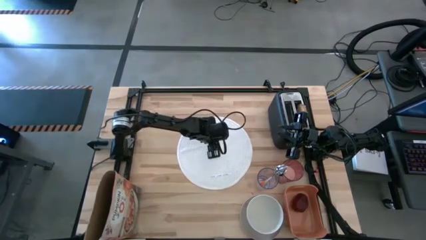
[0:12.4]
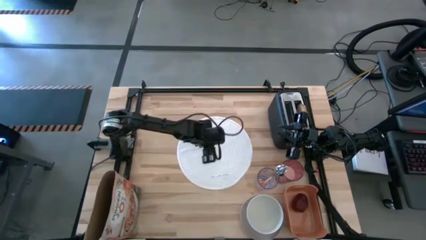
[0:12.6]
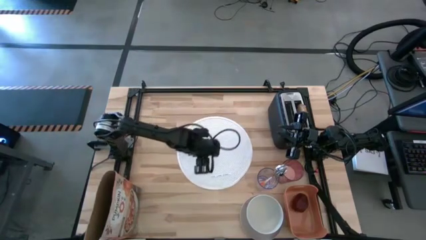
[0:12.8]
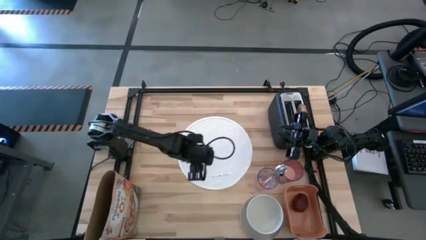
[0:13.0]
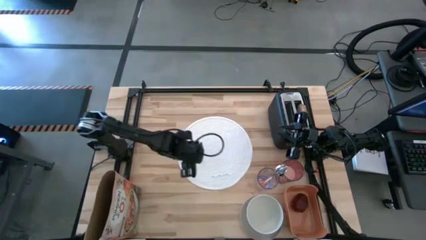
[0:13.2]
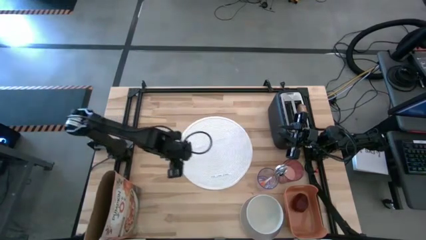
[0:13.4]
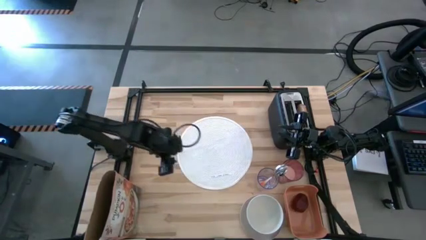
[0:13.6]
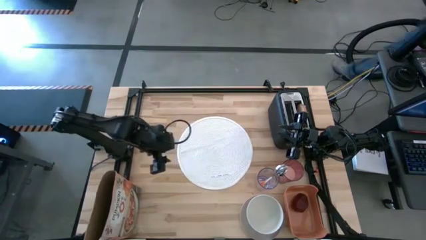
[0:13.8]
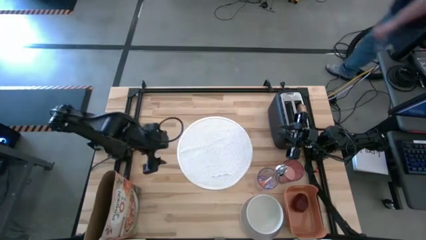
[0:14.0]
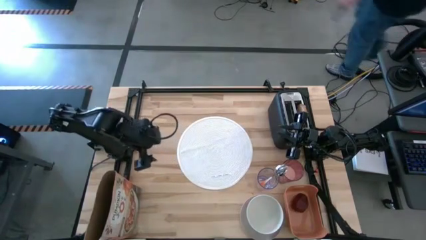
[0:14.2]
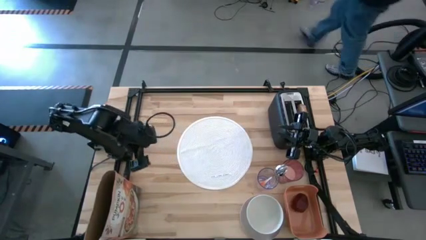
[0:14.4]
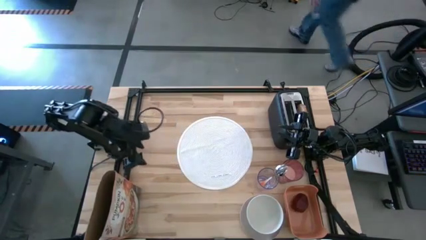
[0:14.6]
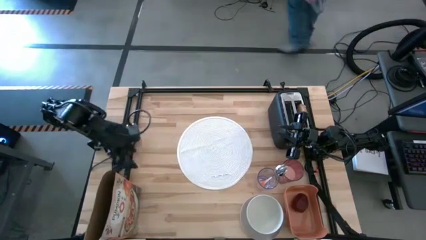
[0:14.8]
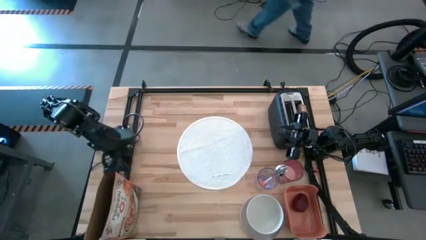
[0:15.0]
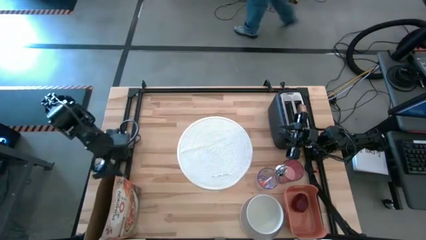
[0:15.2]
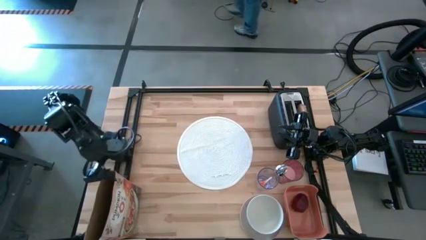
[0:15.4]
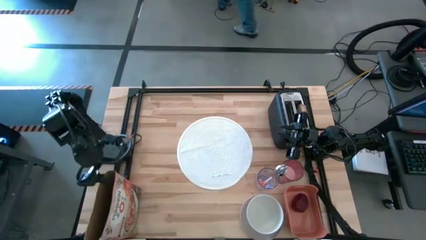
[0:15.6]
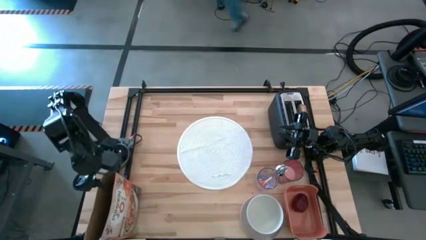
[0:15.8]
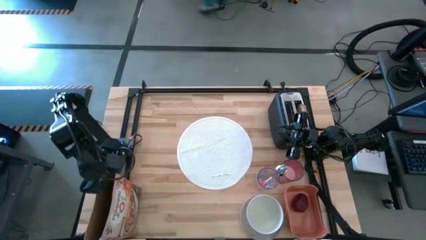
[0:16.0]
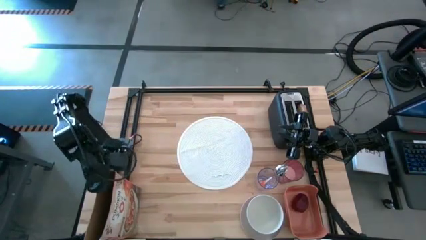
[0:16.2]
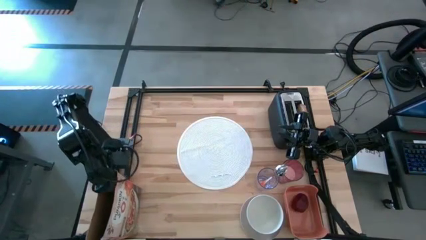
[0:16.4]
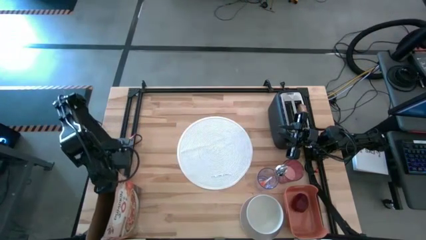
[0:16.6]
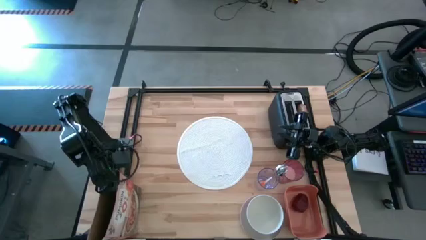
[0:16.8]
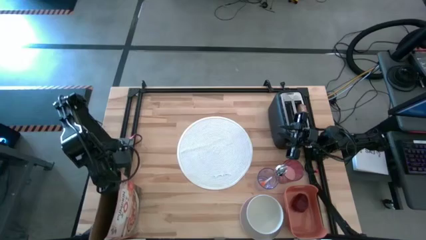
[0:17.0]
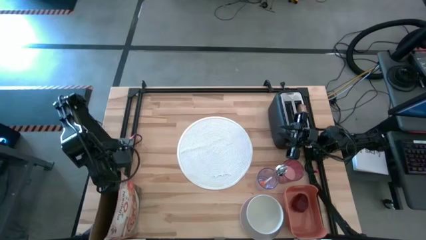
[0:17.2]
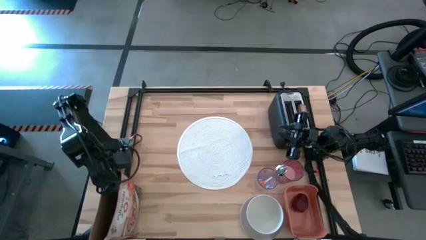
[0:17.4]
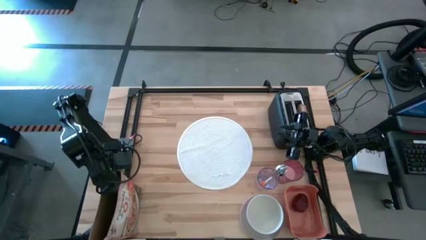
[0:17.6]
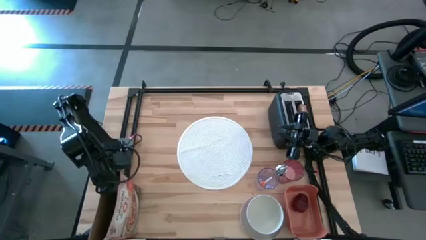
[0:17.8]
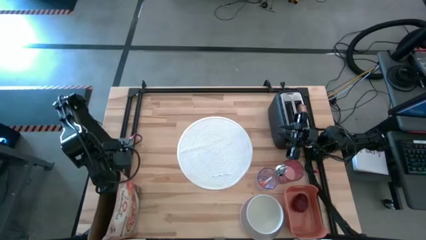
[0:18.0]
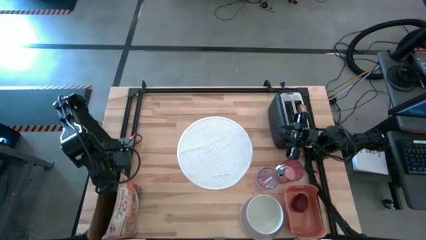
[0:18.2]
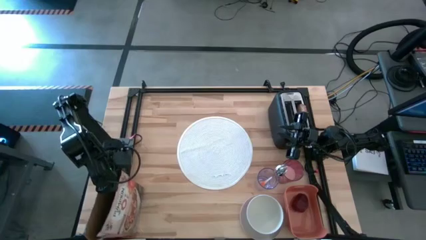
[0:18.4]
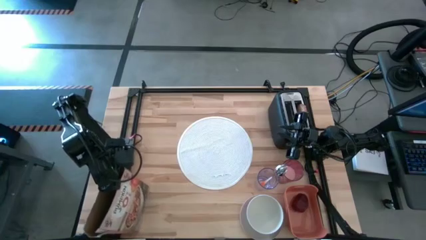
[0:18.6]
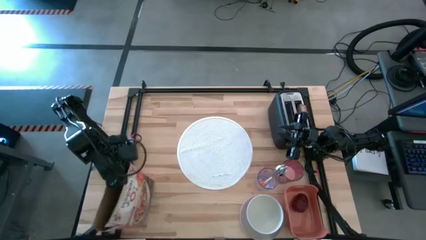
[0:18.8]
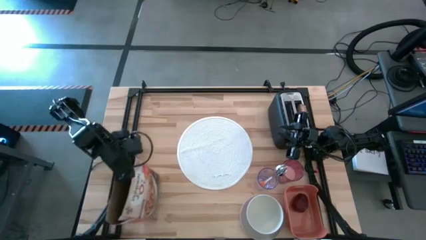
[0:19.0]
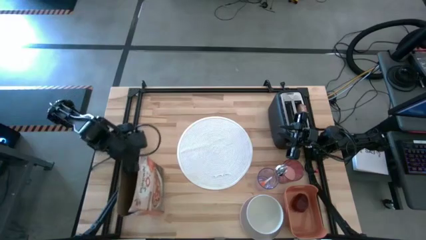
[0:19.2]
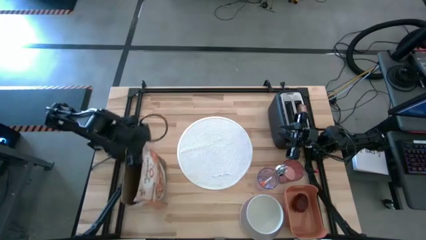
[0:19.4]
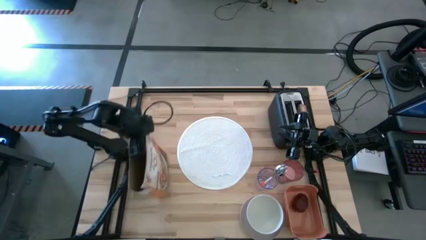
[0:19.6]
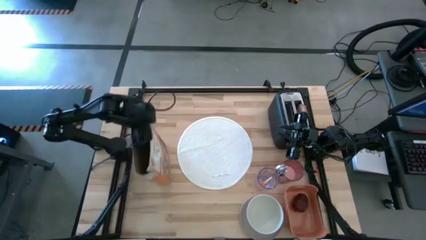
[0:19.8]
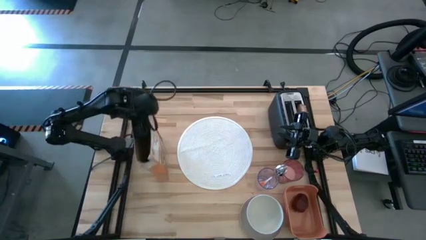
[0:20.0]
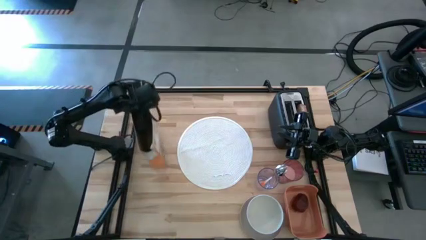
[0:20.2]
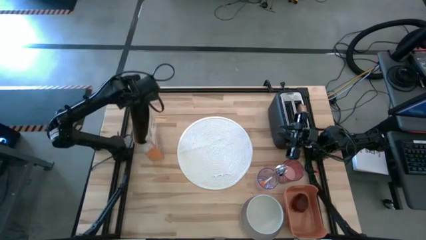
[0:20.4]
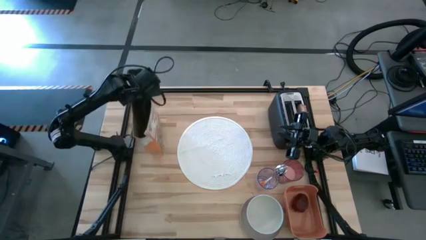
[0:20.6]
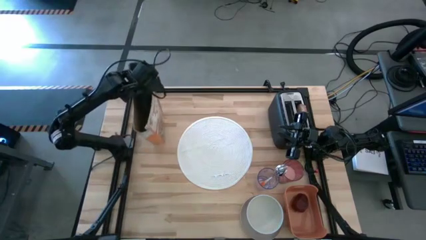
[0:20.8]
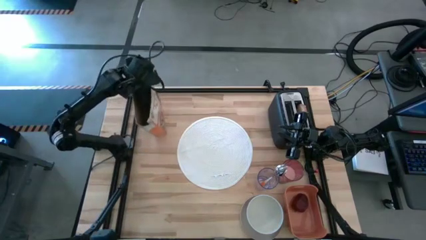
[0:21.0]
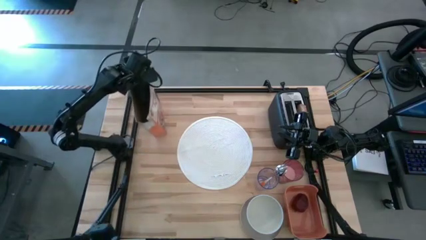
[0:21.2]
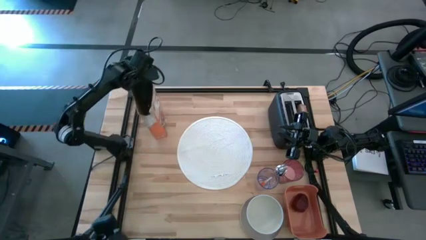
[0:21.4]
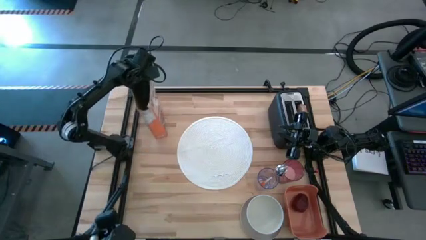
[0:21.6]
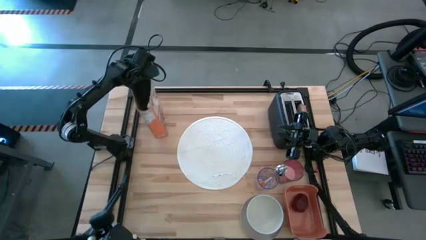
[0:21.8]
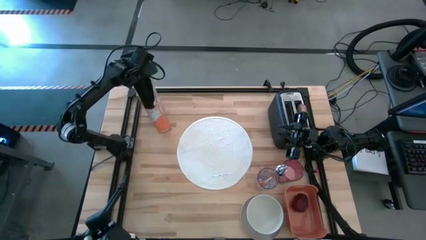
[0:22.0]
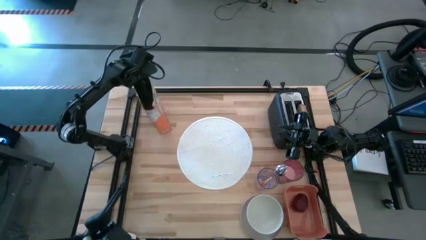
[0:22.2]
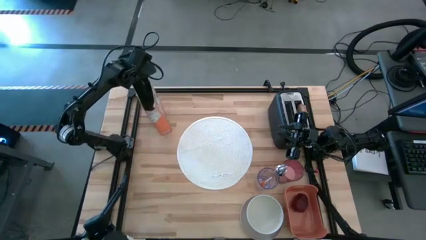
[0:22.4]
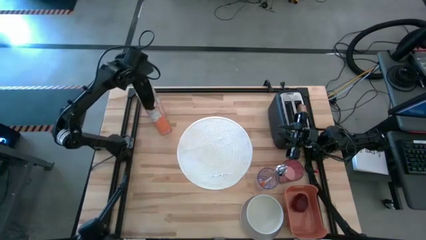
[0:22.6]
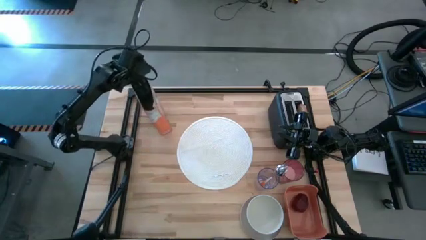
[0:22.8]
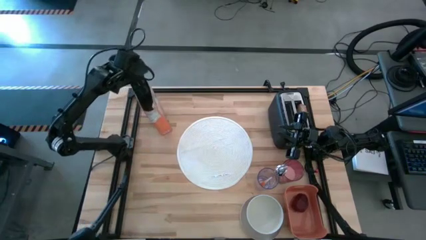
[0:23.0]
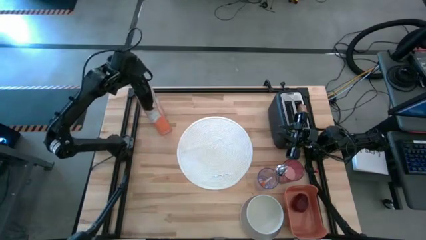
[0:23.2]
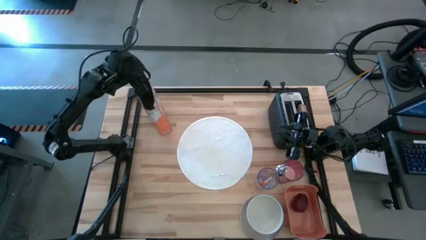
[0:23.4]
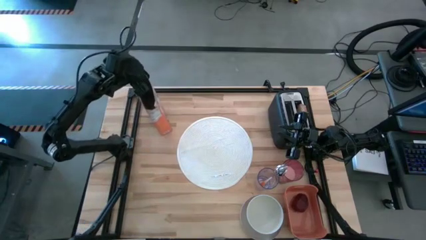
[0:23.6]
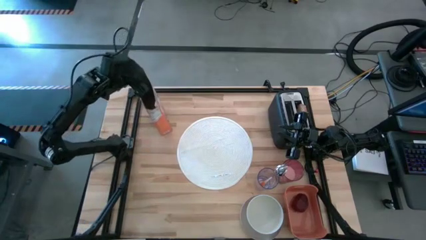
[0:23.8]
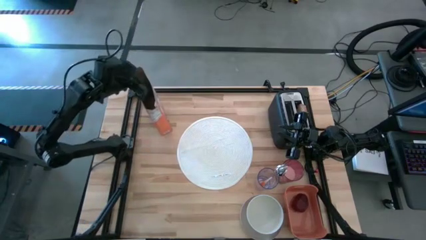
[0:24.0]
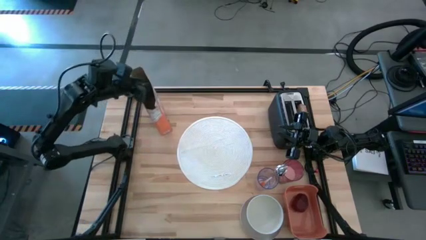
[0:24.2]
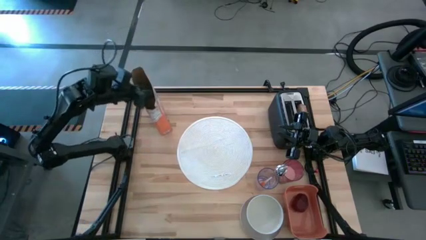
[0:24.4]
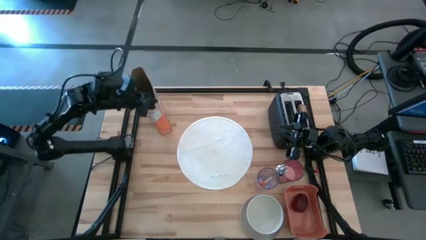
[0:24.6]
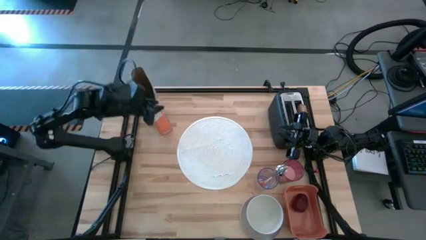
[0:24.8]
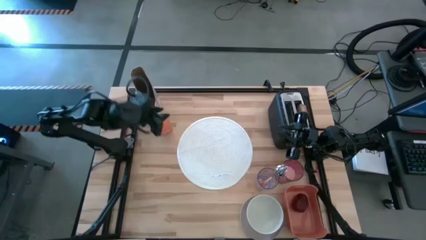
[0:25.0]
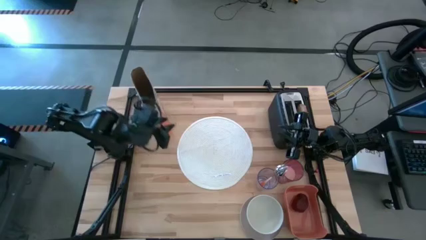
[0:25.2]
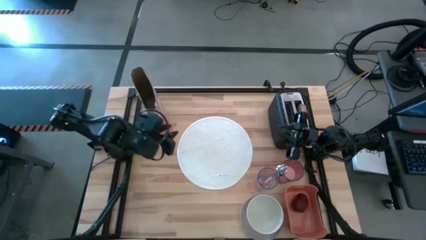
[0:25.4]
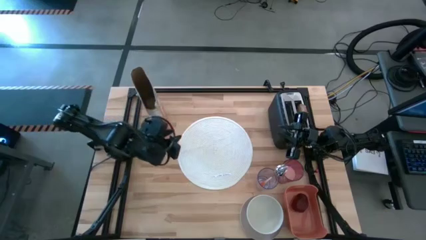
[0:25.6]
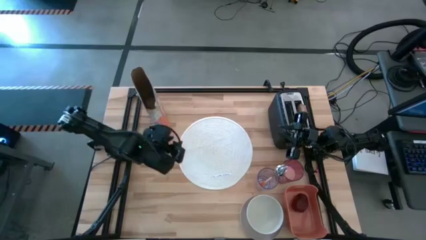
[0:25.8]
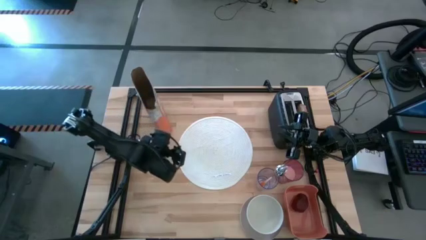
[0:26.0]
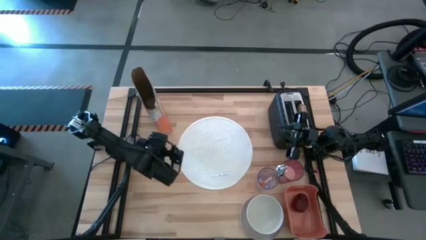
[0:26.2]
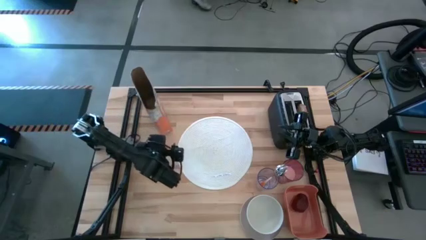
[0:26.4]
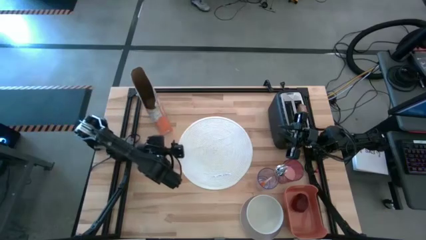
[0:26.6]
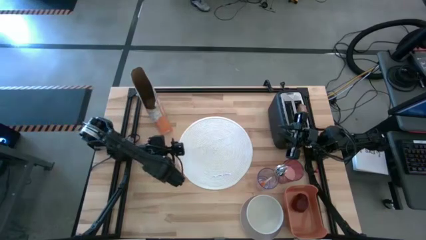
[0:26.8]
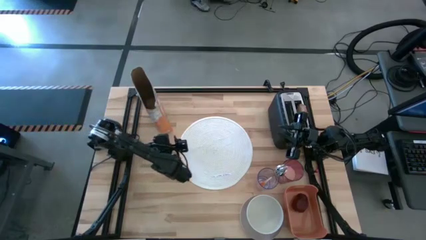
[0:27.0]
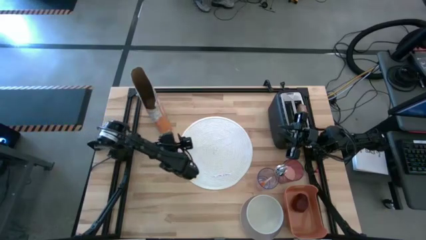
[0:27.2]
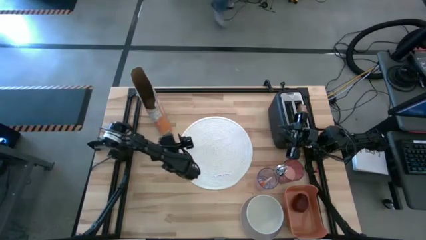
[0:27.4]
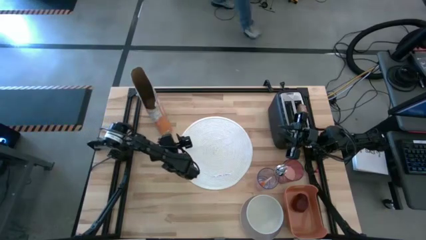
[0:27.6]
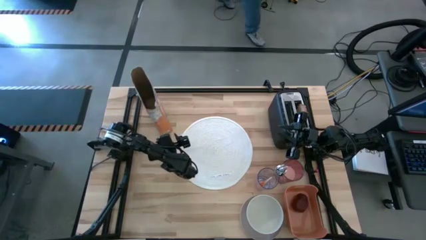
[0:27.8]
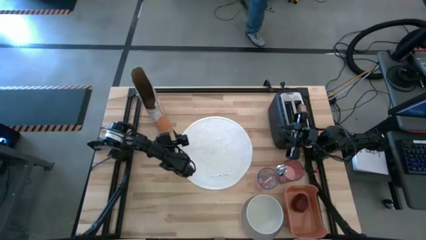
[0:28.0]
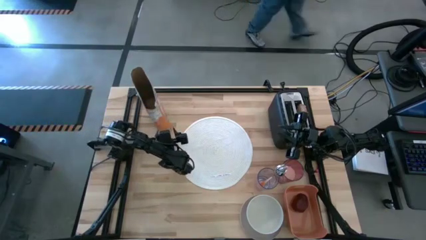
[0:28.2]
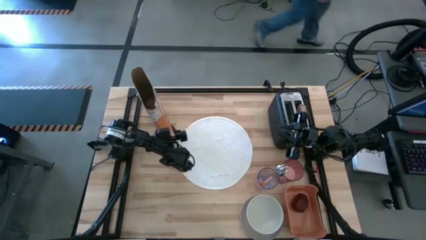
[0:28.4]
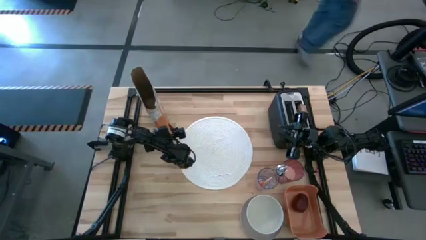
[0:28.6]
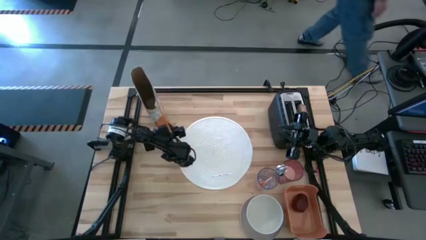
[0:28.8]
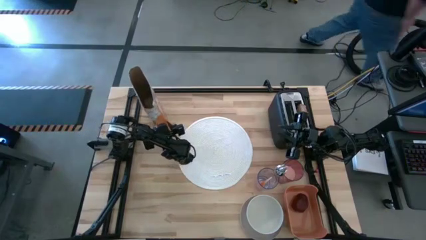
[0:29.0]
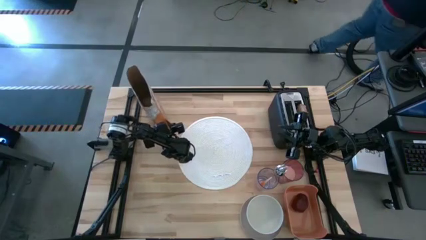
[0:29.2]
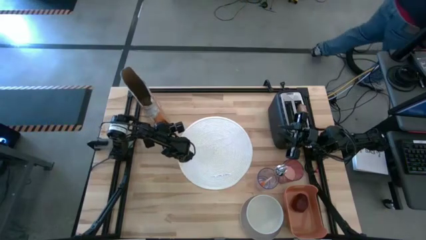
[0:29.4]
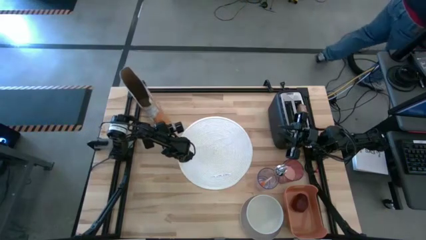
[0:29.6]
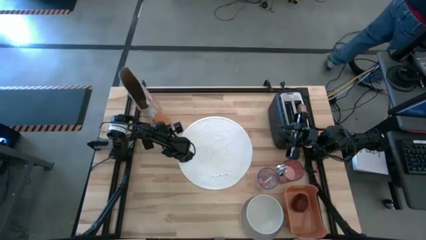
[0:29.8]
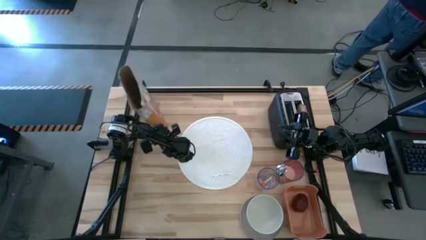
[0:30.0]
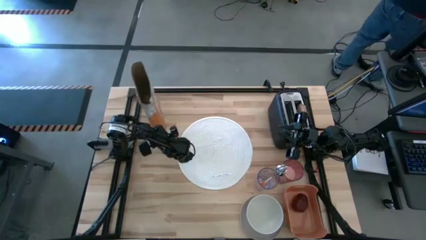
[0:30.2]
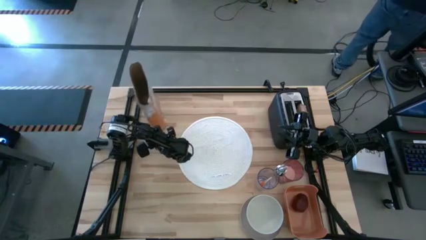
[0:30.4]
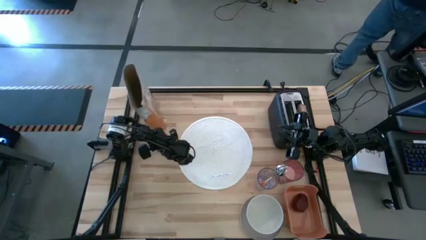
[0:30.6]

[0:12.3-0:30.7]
Task: Arrange a breakfast setting
Move the cereal to the top left of the table
